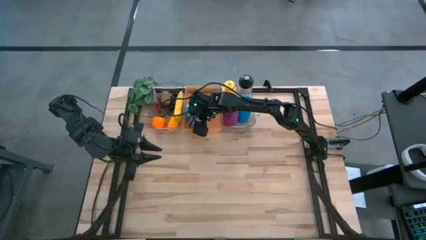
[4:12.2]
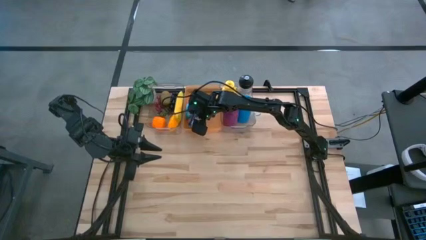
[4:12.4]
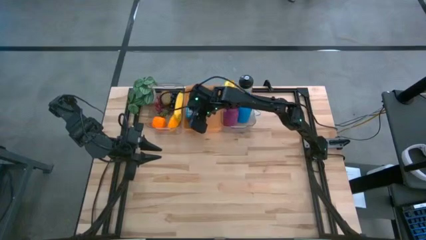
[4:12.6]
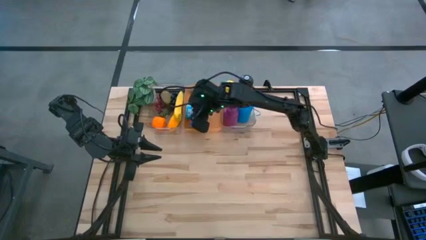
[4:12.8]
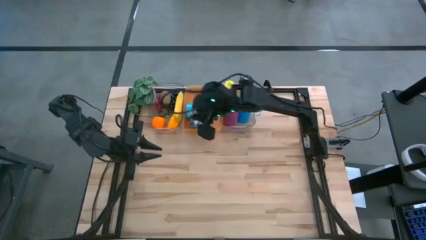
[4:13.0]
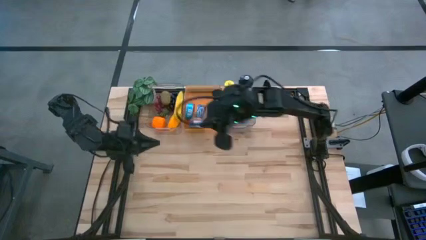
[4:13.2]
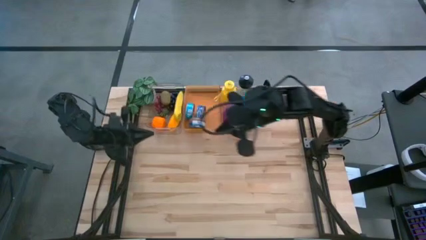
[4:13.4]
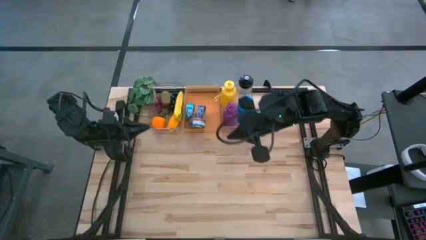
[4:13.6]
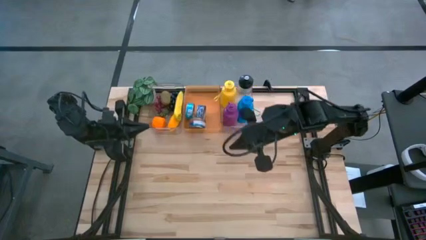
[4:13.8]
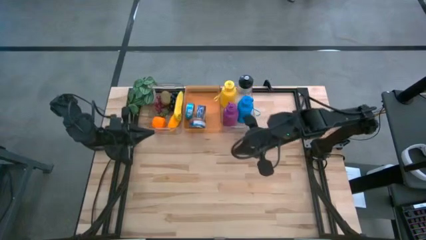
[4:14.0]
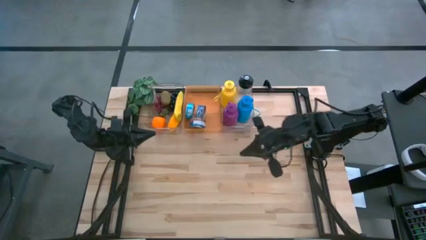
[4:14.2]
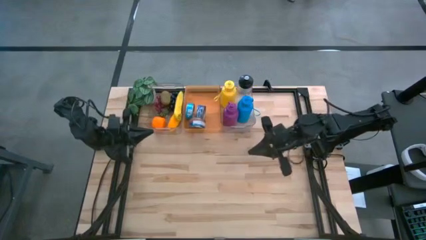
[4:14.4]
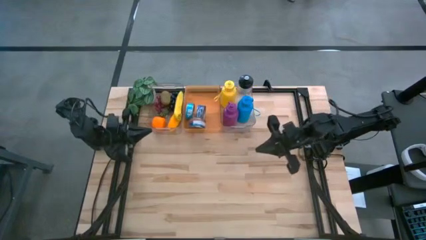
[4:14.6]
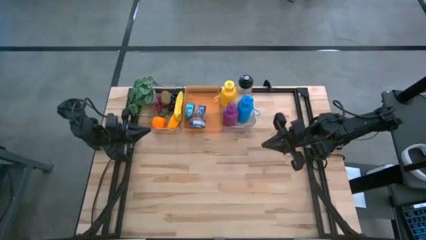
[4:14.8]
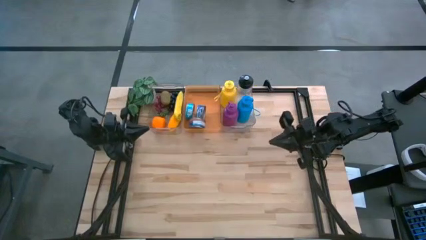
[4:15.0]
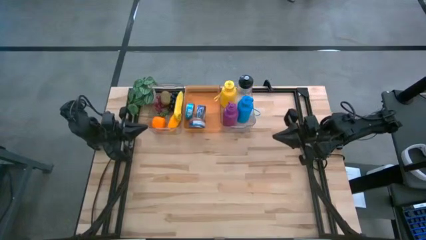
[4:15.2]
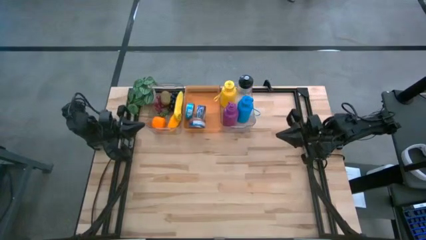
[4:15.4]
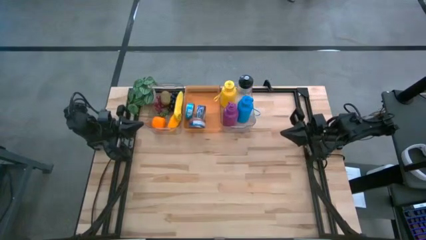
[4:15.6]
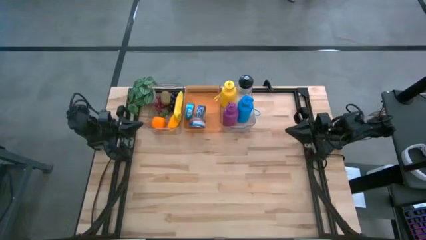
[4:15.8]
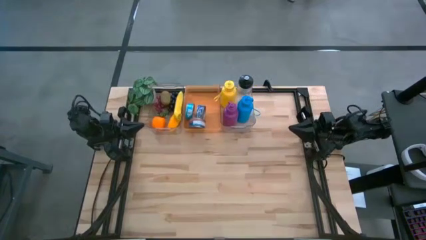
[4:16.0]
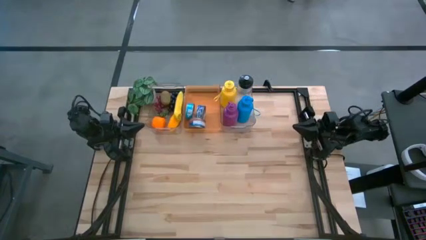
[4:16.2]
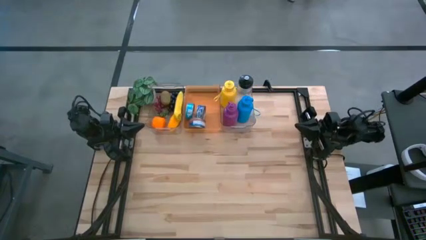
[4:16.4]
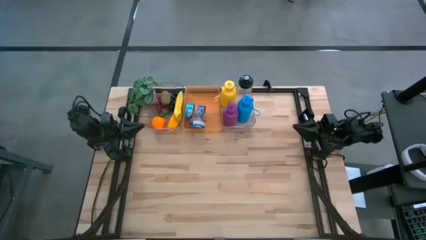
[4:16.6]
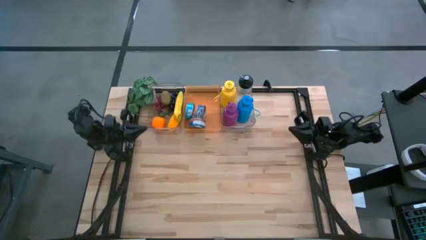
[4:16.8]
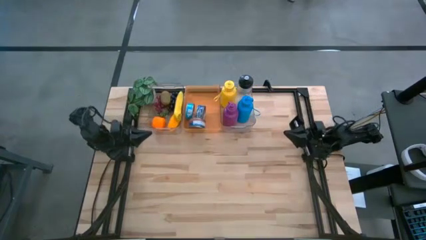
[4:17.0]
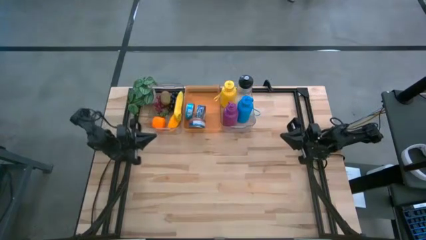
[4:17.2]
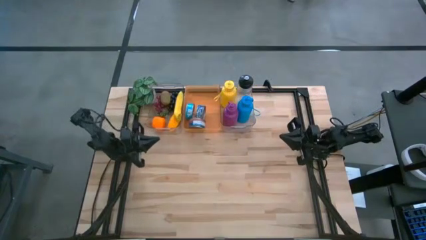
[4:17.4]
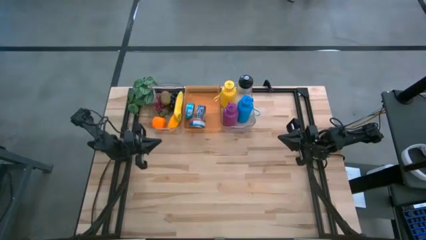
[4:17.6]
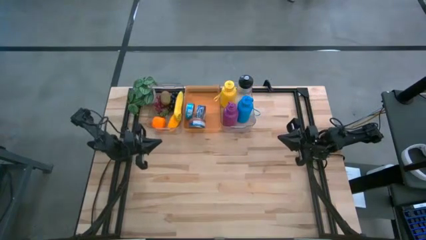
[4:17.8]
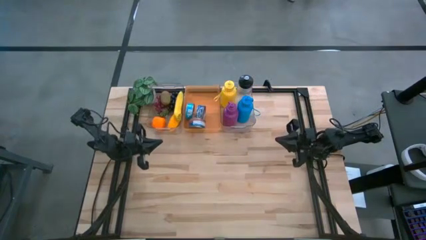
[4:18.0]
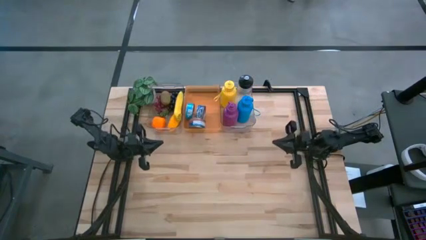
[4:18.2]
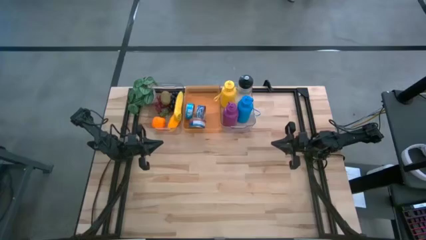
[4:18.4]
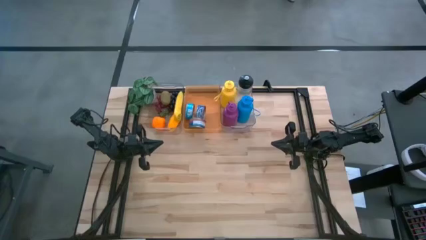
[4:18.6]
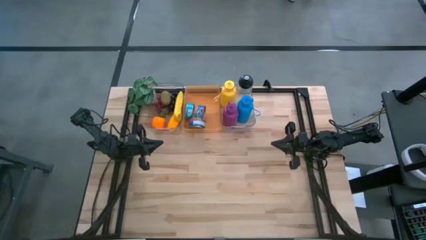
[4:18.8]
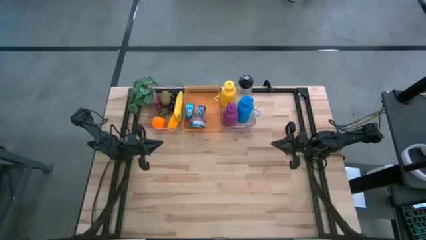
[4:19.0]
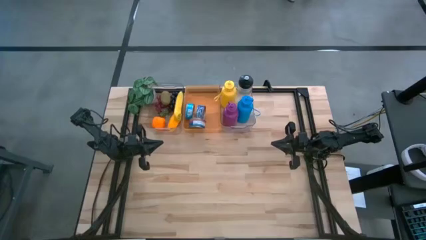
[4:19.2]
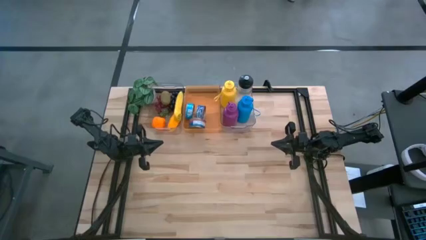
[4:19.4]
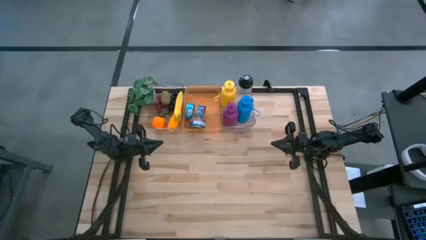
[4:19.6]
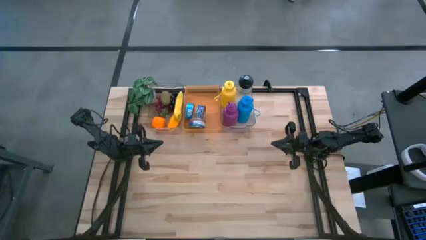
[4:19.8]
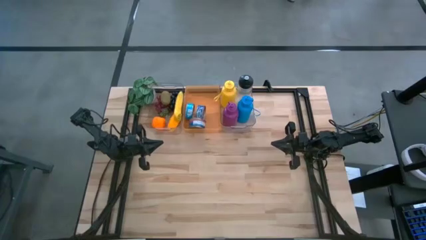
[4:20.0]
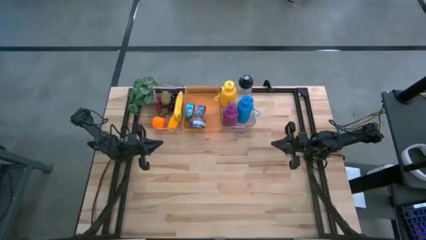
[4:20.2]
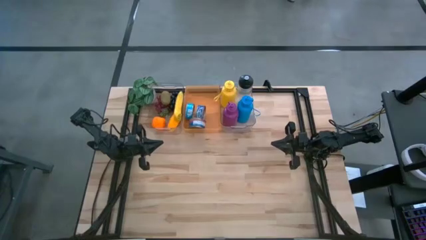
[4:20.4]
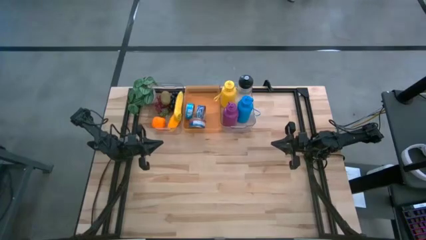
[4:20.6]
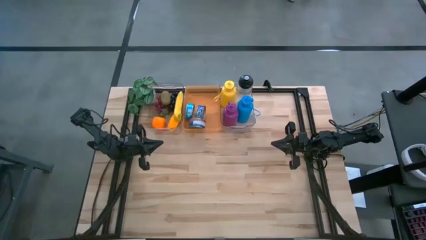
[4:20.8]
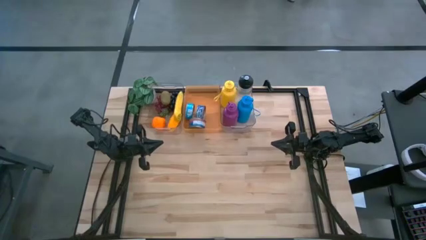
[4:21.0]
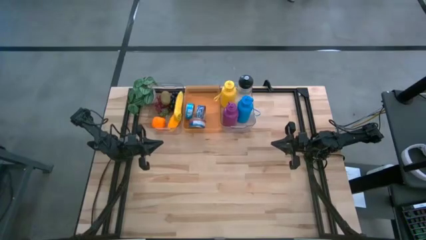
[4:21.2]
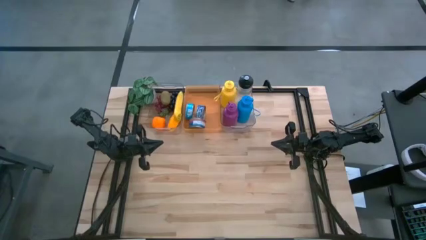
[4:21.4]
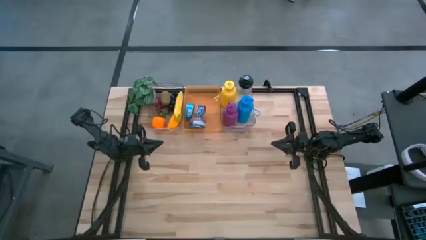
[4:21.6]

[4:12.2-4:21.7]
Task: Pick & Place Food Item
Return to Home Position

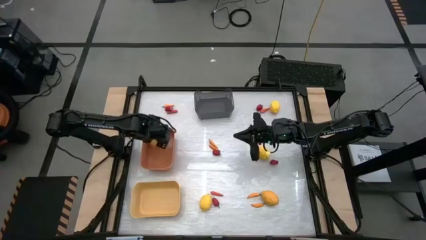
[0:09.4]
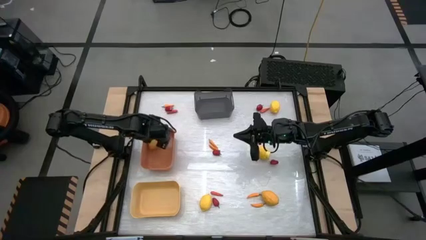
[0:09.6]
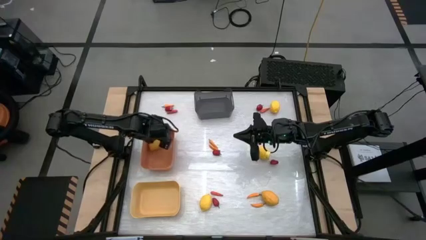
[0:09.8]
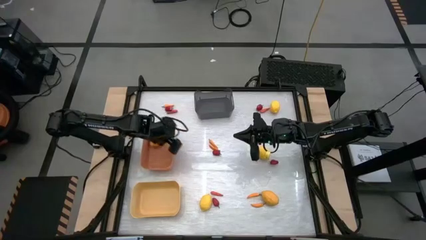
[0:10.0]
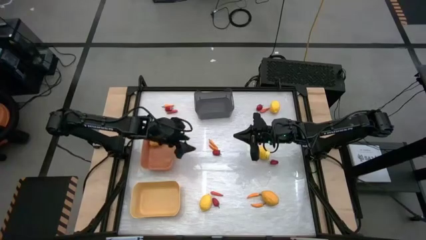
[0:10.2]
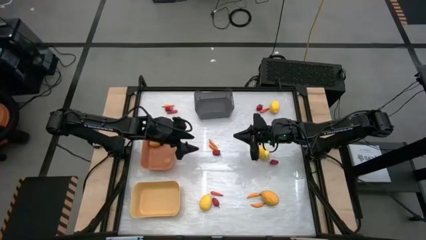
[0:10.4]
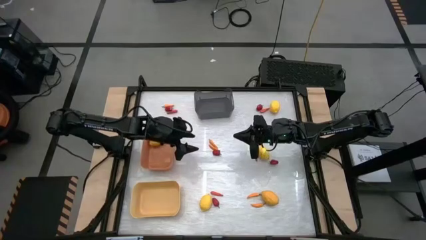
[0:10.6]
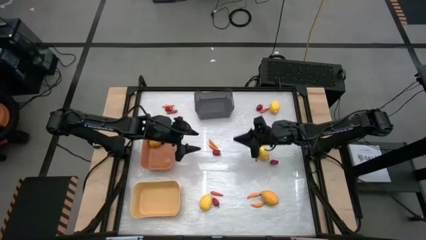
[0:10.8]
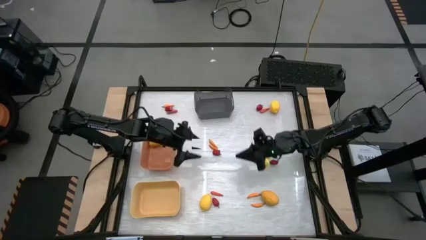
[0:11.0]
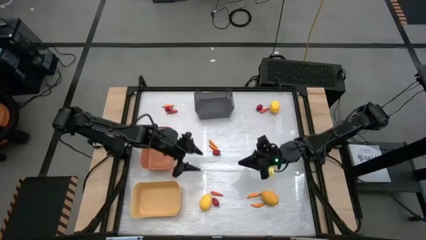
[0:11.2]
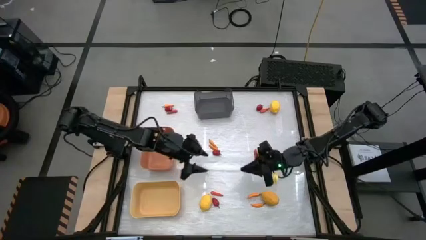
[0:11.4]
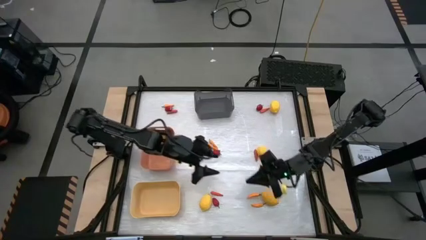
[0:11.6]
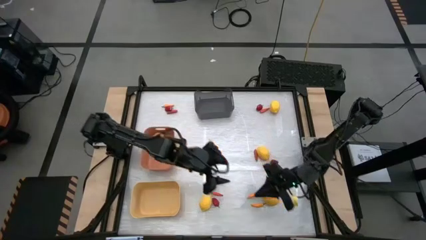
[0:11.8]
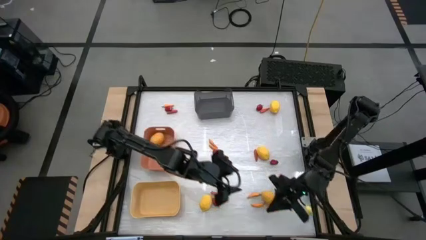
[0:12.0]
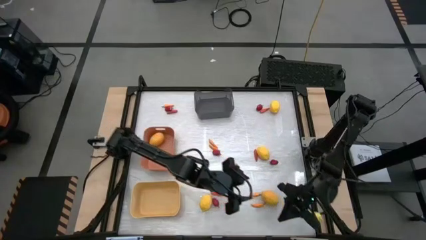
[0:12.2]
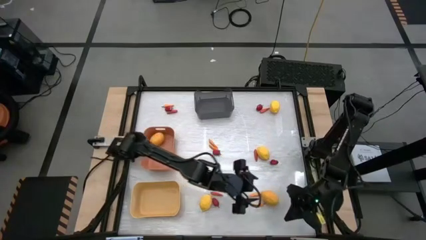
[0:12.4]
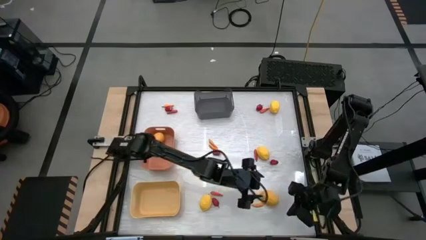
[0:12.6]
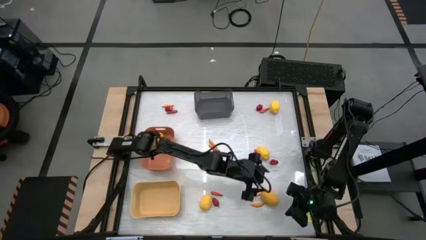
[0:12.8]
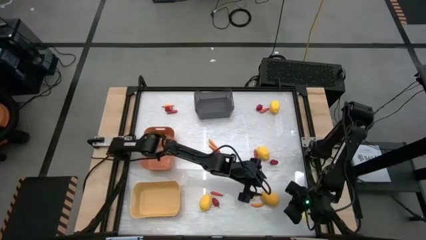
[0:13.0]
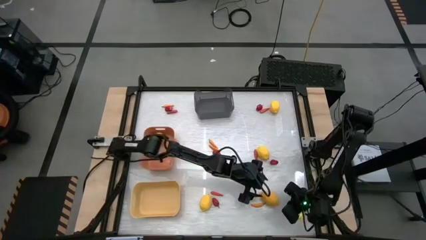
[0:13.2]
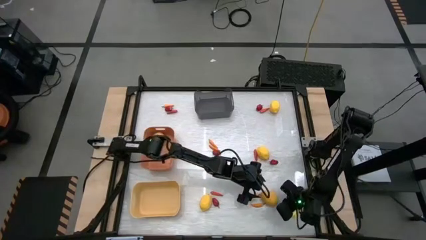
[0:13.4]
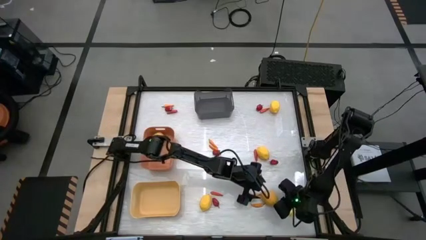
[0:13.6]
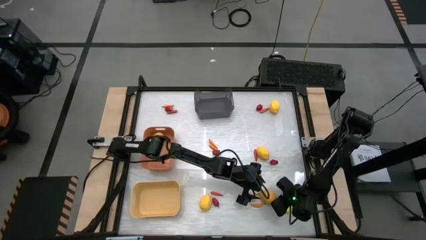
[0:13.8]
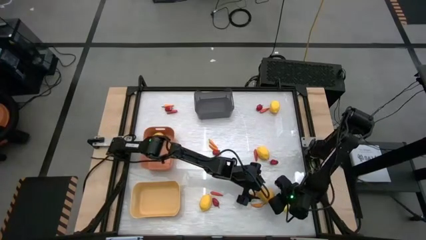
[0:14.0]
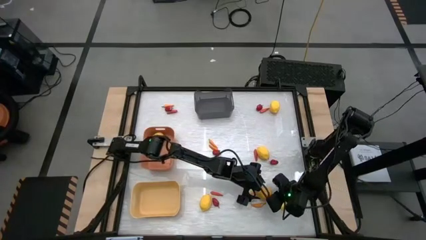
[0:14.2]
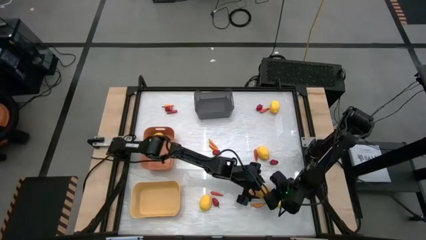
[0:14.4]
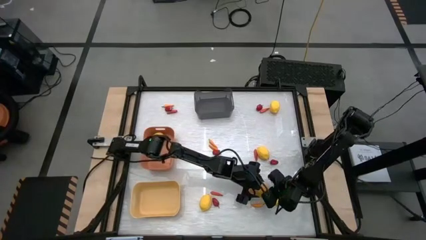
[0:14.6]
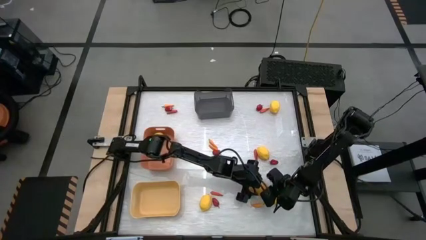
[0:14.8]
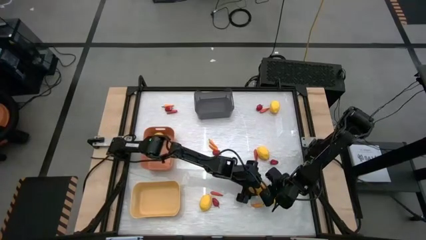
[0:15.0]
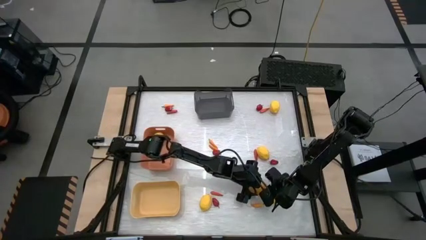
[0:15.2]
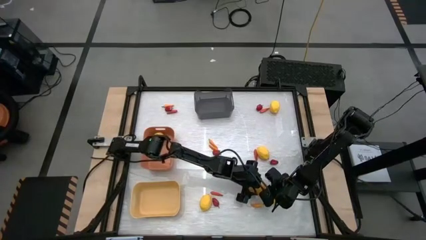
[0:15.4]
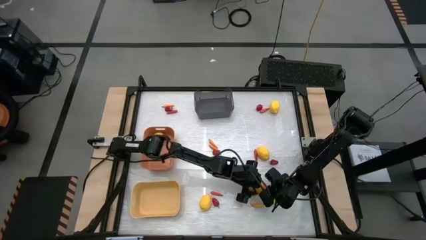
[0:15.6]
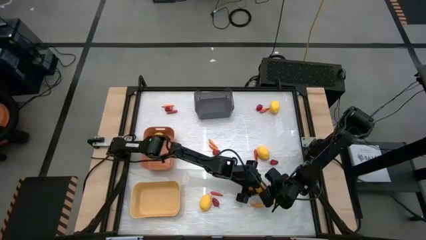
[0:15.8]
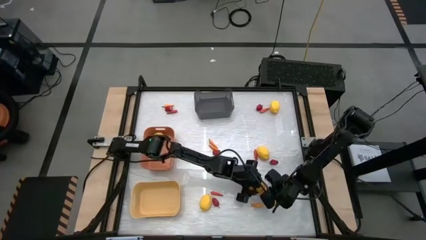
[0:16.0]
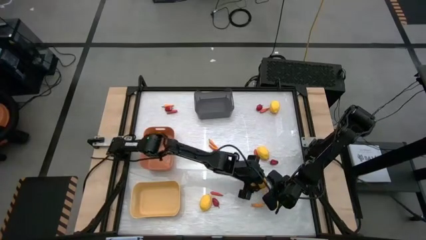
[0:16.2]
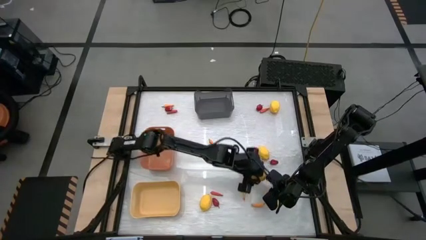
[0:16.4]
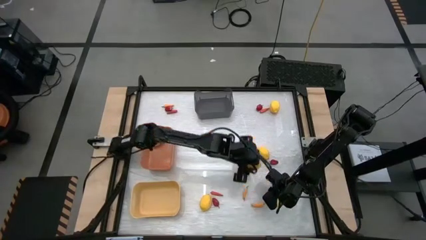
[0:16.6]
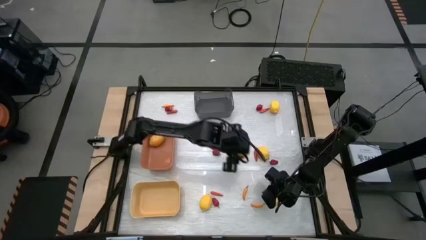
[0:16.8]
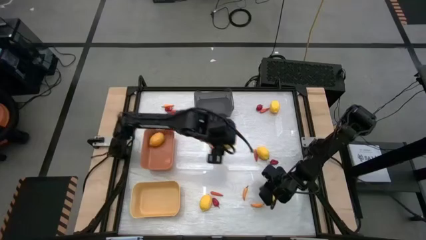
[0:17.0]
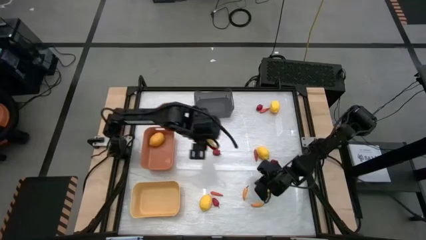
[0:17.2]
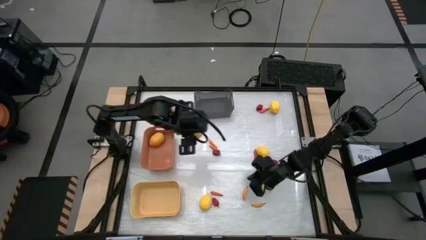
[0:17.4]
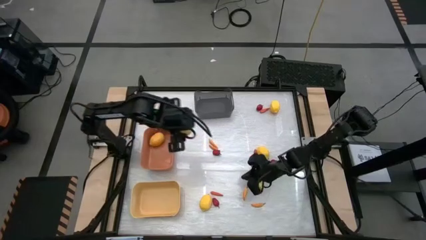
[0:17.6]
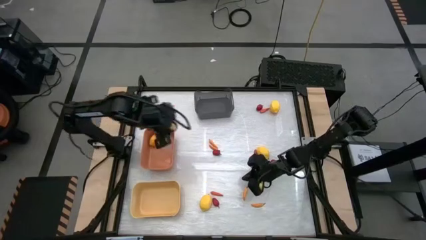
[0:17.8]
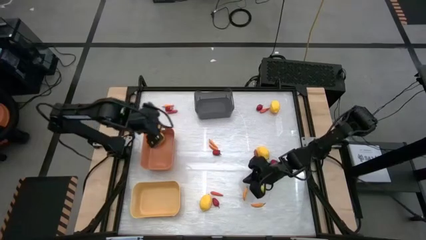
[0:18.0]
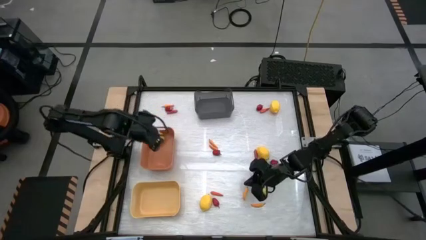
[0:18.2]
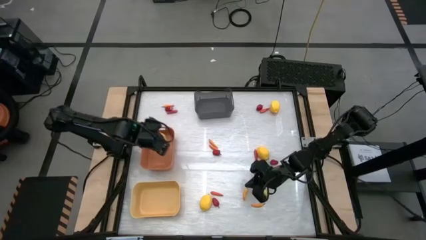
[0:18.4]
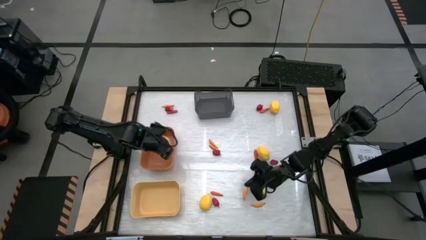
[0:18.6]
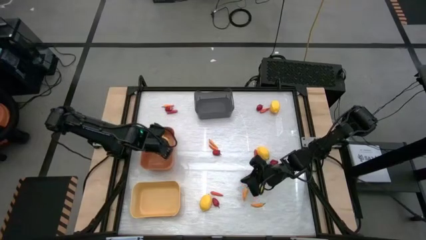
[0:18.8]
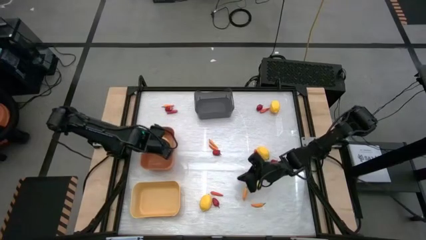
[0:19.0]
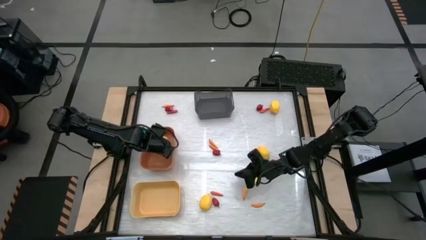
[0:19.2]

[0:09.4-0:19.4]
Task: Sort produce into baskets
Put the yellow lemon into the orange bin
